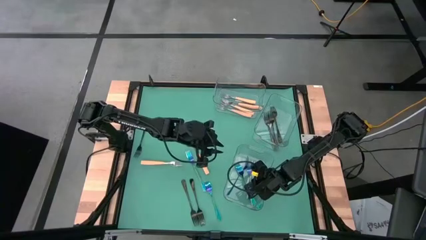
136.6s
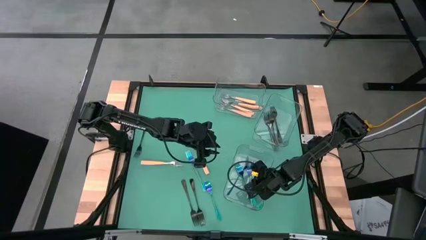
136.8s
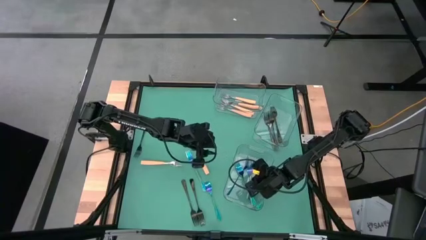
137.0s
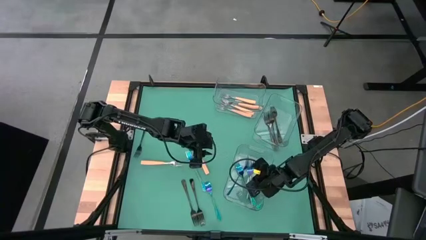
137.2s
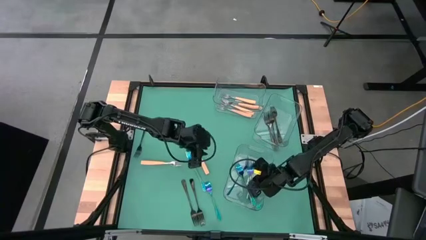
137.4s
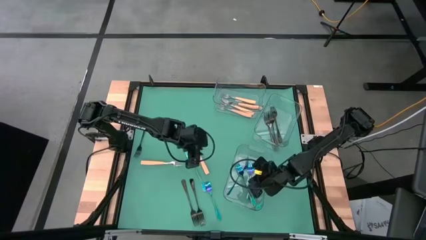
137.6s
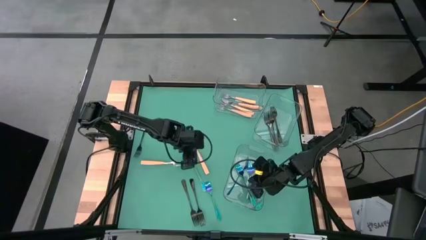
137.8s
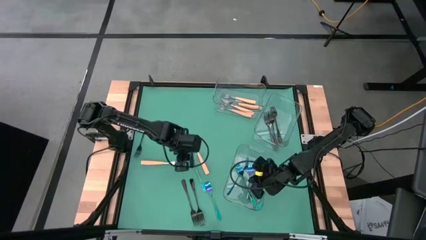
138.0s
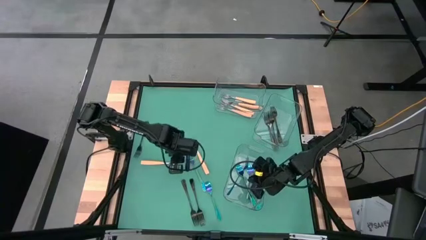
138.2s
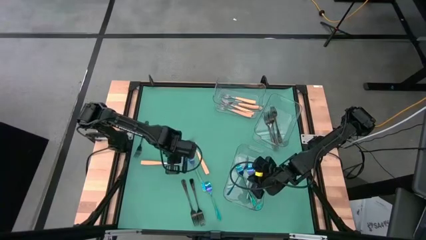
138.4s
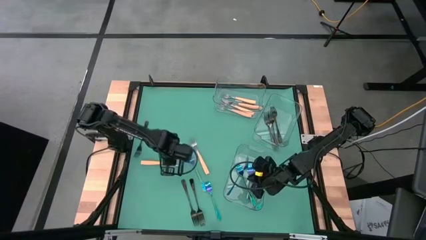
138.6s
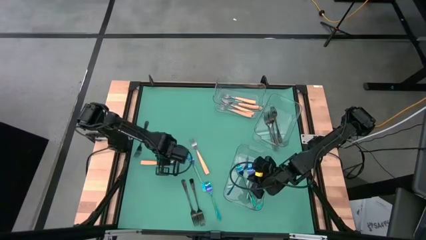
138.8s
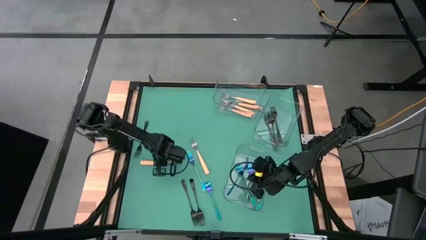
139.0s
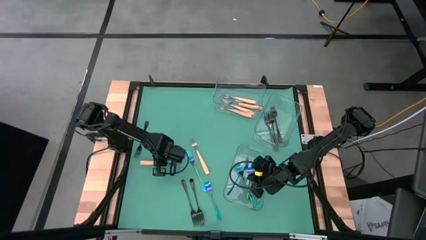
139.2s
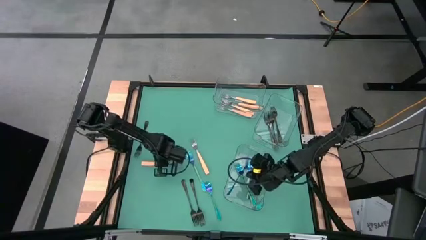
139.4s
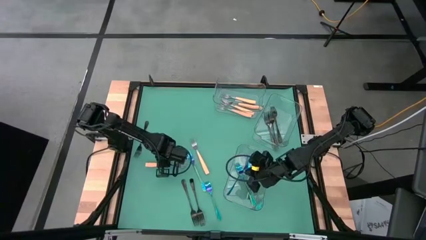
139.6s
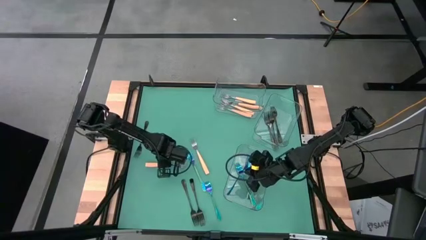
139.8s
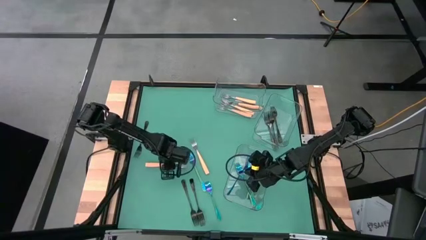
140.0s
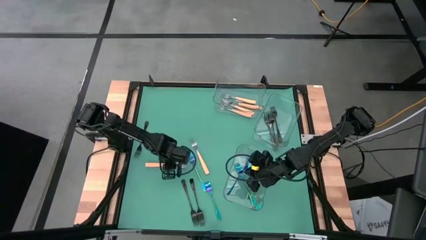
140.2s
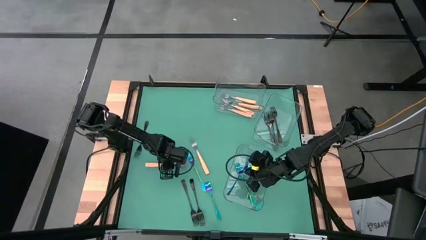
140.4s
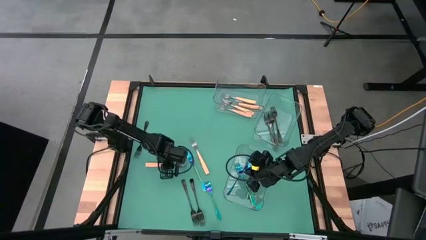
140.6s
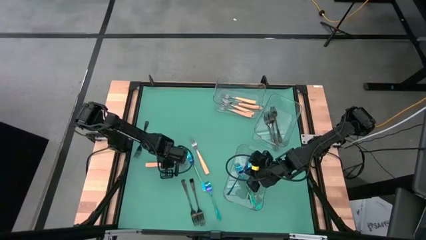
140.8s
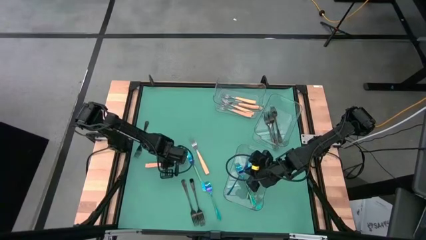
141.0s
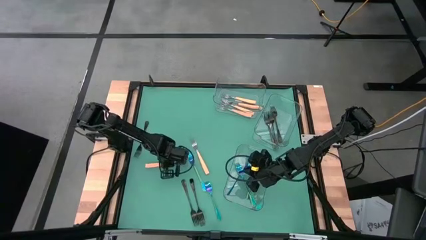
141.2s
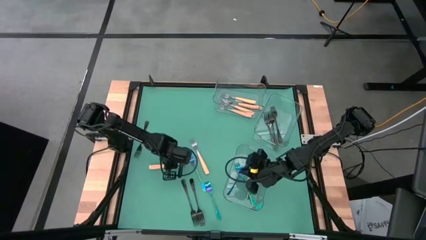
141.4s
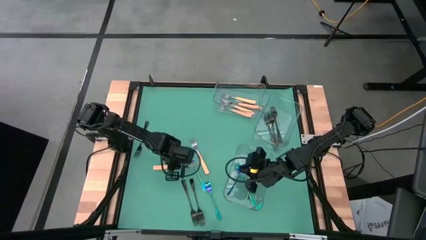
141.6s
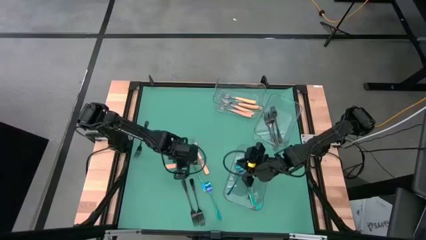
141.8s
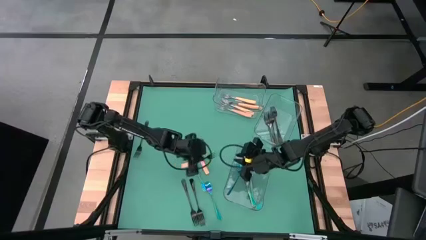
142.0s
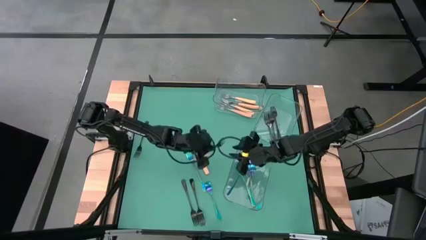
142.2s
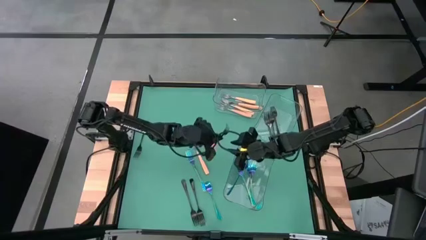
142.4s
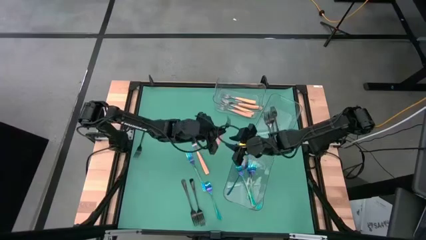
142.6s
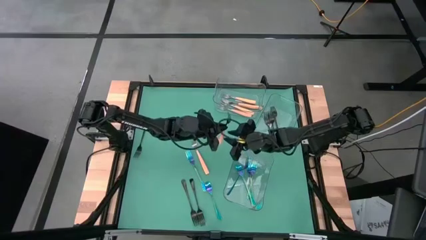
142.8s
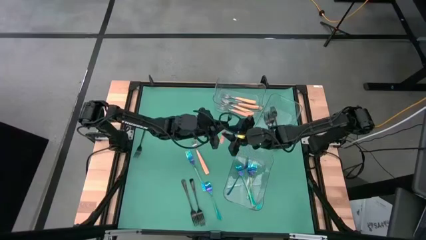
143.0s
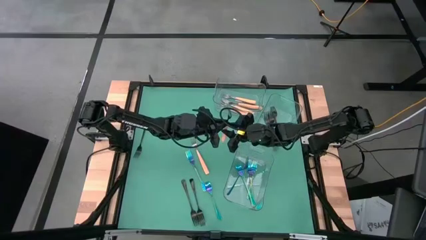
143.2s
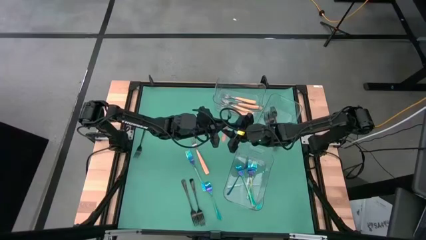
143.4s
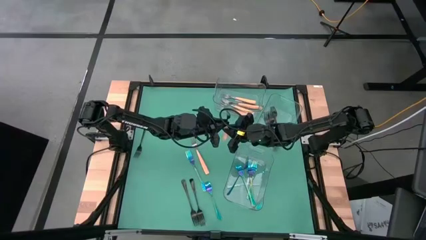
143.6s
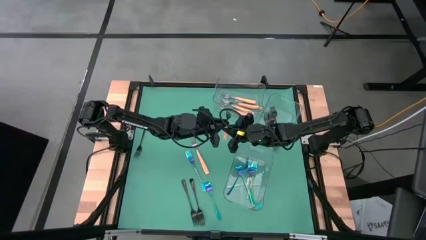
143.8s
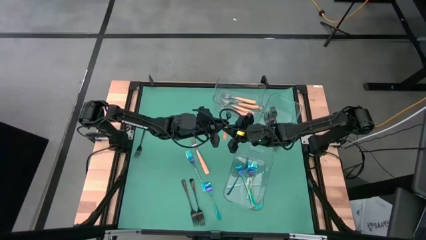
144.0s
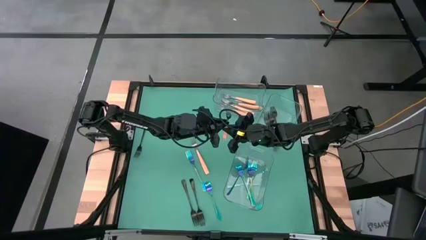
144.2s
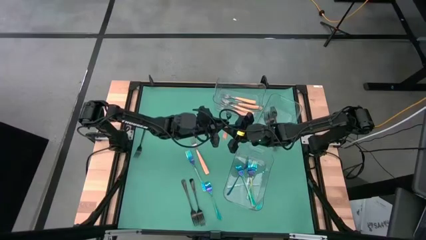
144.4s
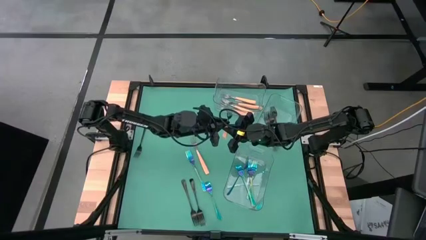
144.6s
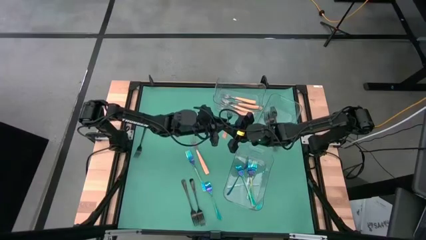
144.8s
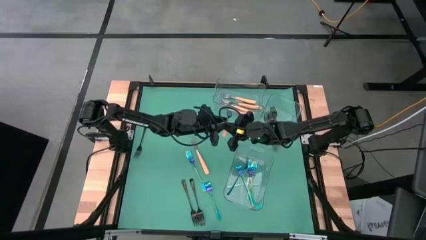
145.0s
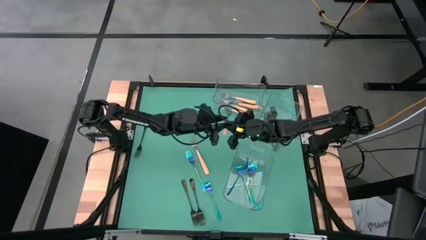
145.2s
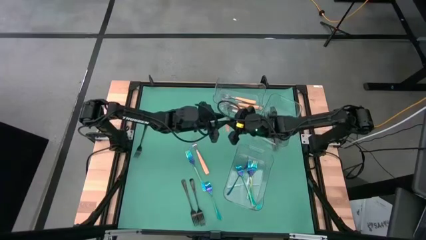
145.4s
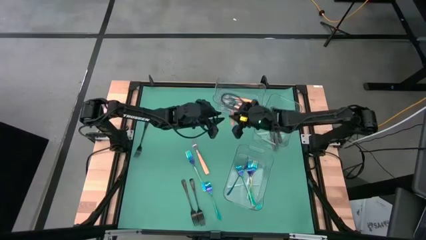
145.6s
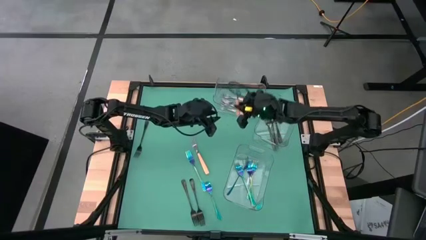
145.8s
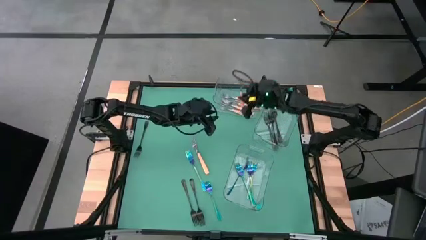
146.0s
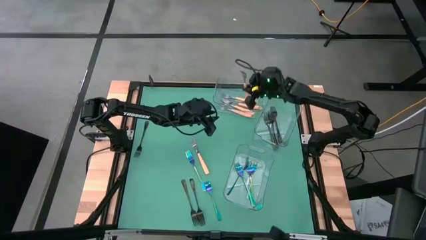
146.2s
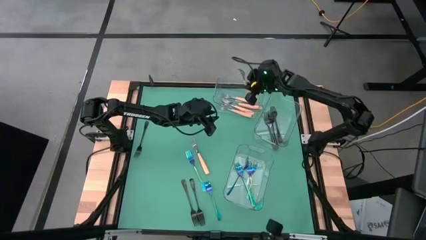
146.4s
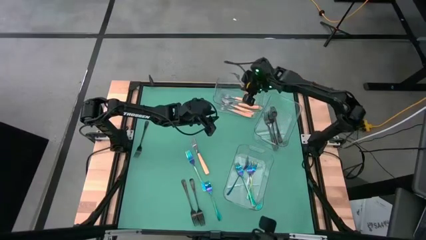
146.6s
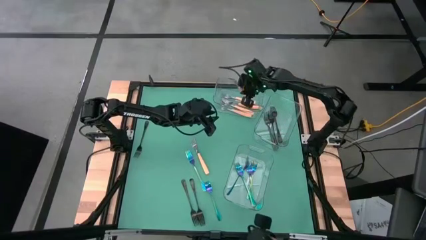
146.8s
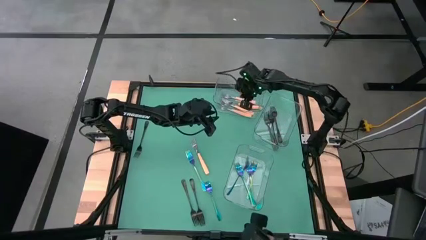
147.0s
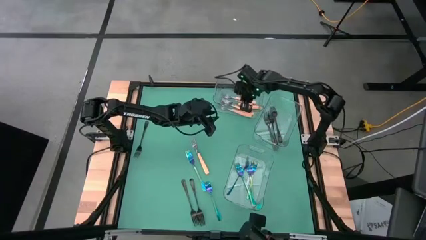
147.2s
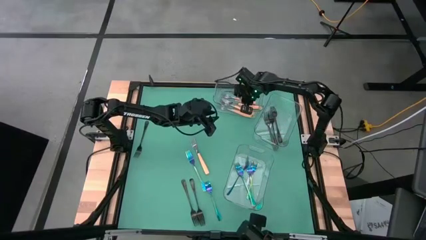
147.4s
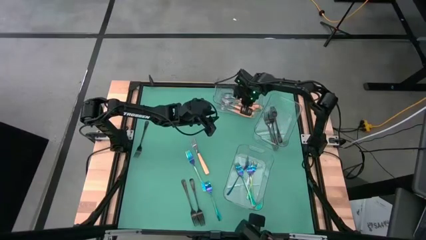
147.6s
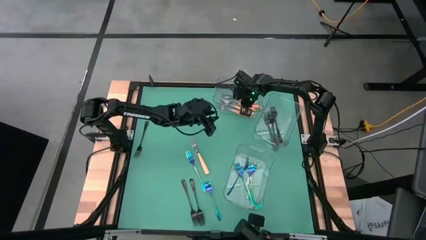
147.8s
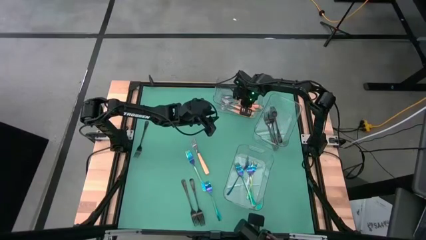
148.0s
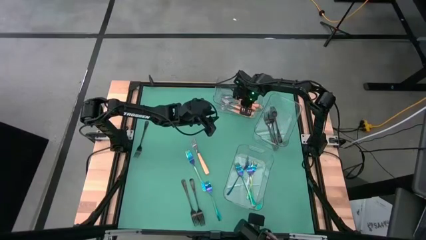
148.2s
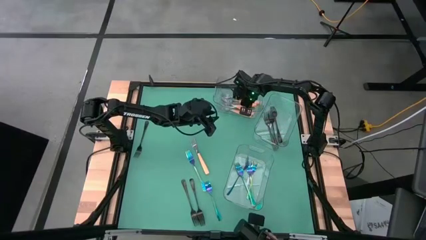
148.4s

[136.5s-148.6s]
Task: Sort silverware by color (type)
Put the orange fork into the top transparent bin

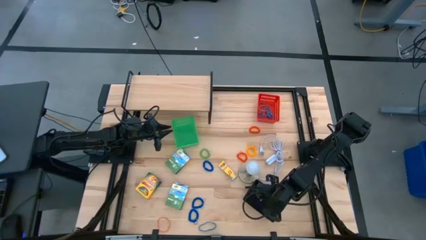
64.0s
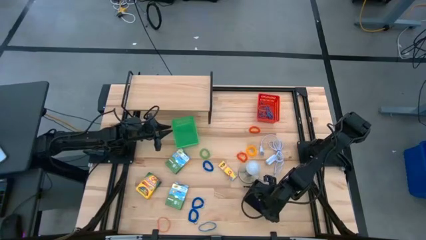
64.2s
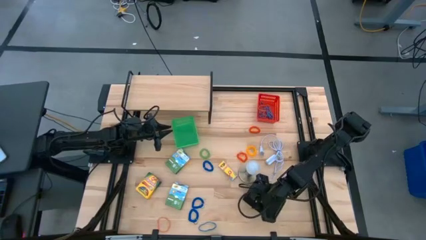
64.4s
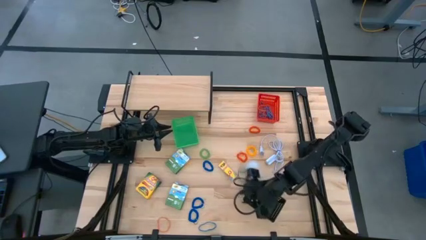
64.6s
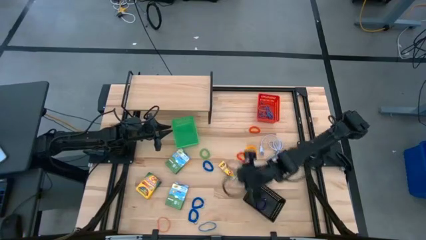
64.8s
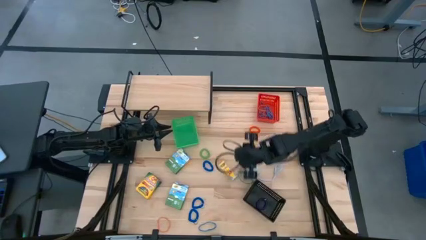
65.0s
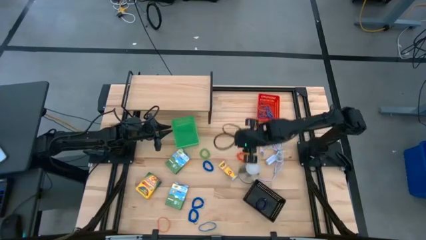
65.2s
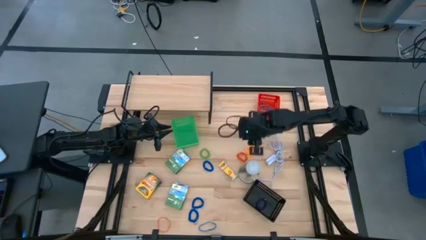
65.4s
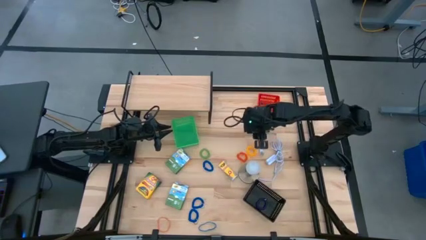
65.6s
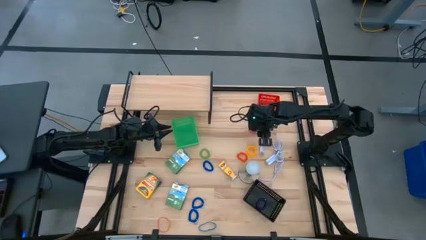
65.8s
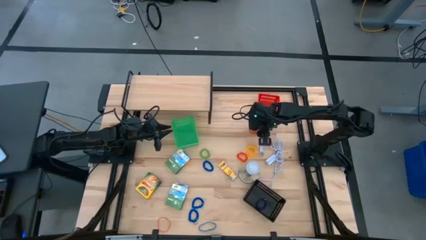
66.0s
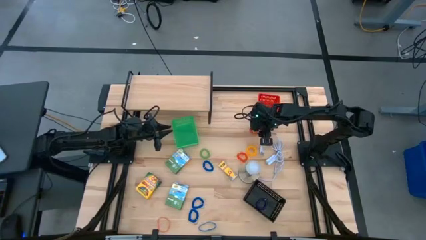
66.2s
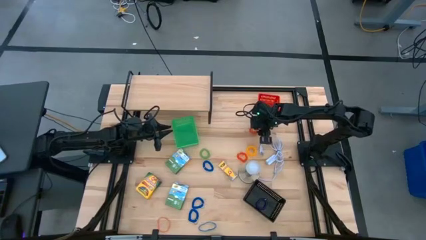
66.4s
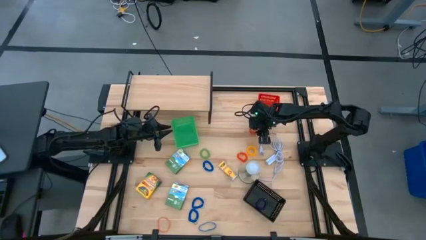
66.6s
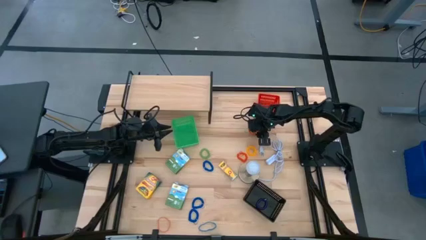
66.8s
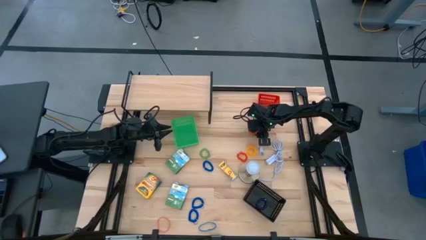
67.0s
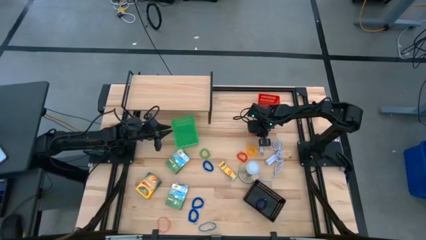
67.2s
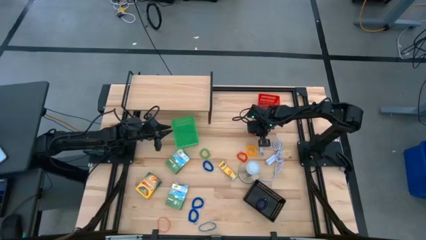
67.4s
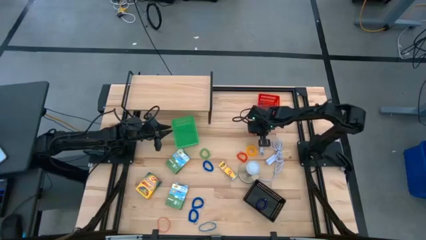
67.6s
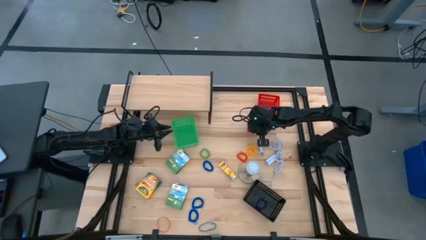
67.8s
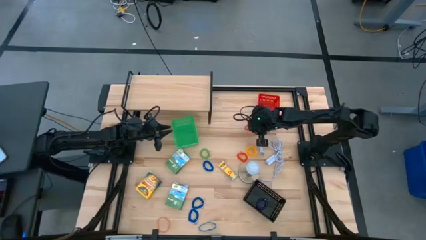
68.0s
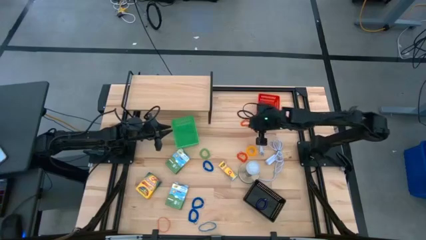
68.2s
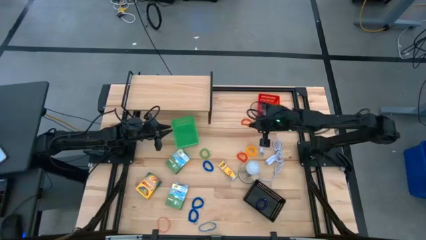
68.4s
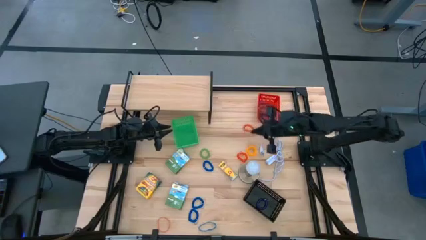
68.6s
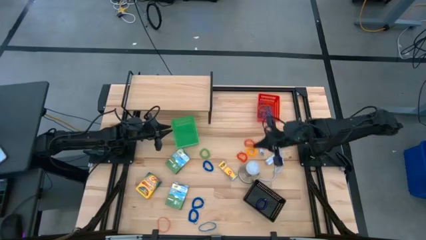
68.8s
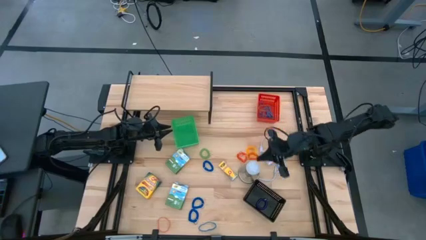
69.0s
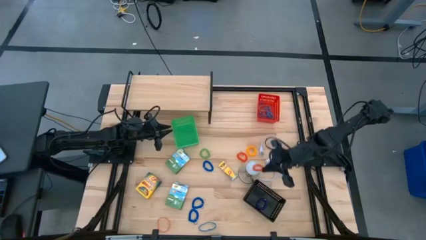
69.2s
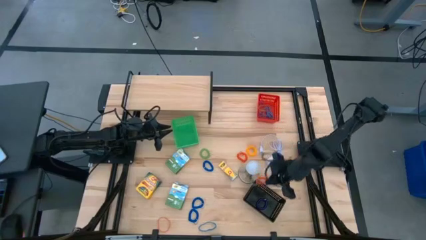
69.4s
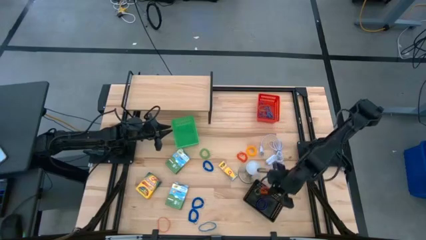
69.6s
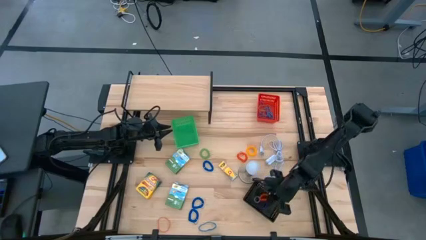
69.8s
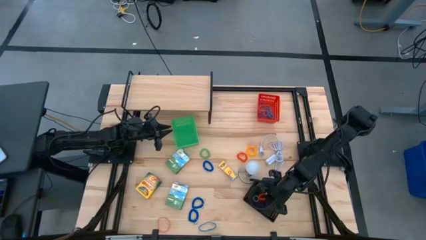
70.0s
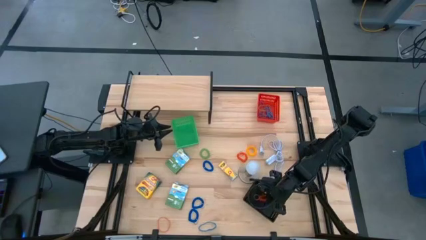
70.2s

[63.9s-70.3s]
Task: Pick & Place Office Desk Supplies
Put the orange spring keychain into the black basket
